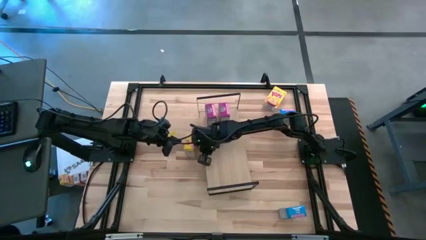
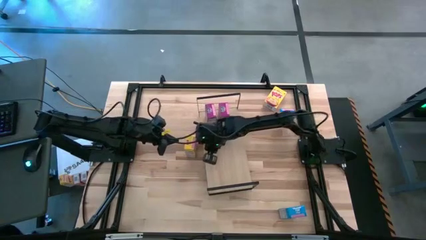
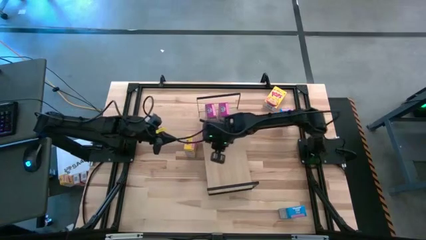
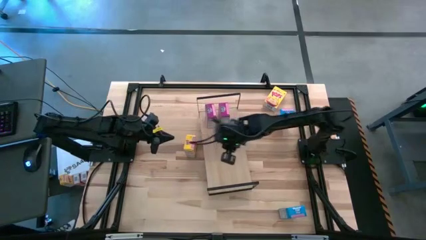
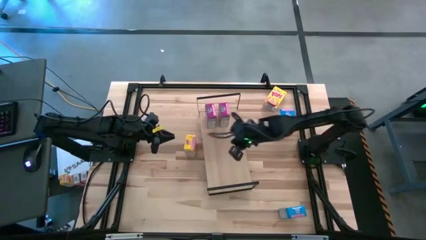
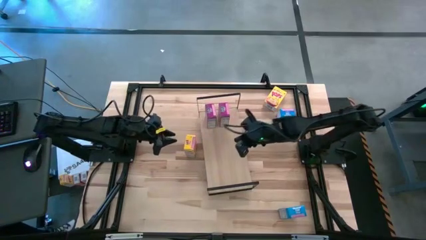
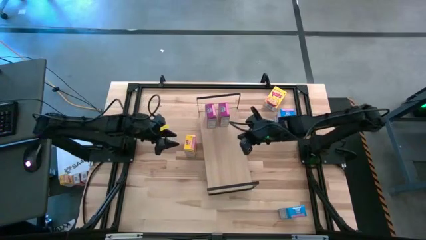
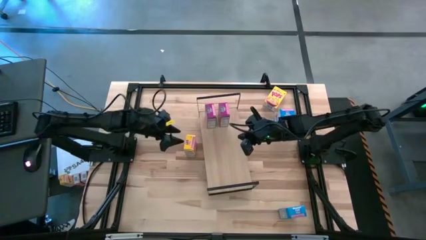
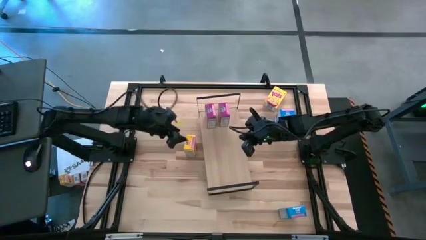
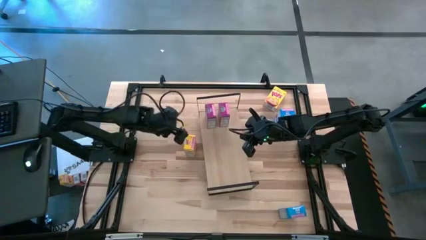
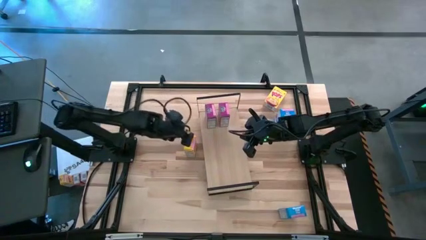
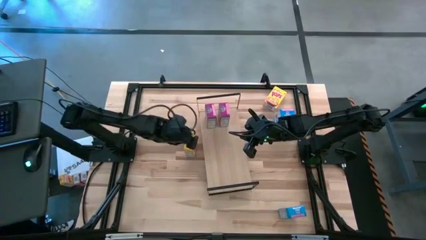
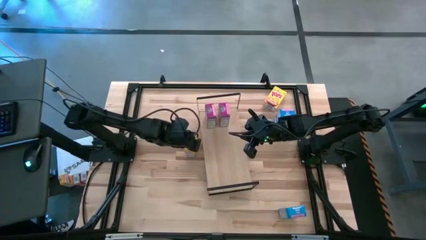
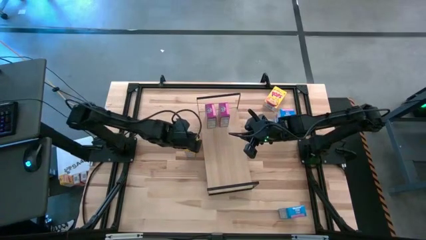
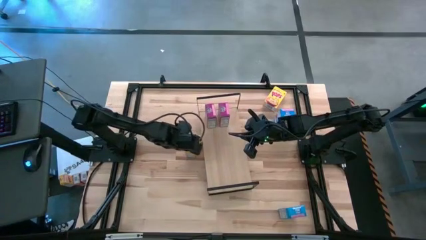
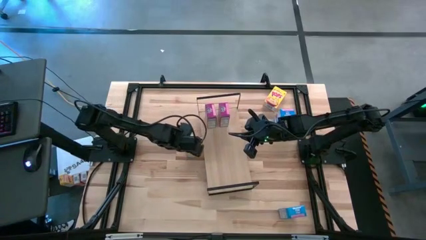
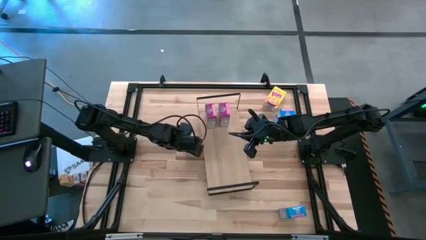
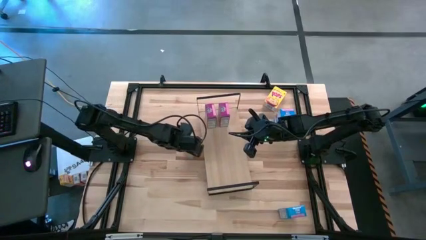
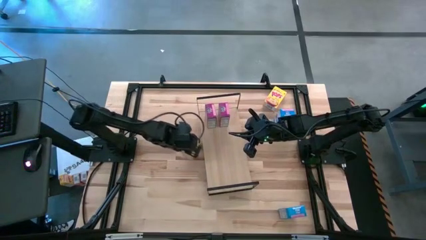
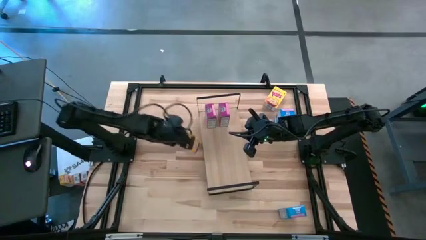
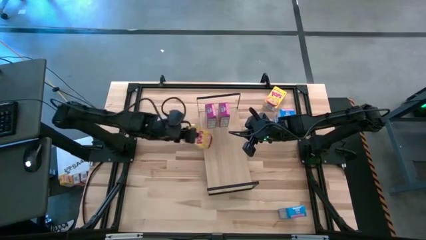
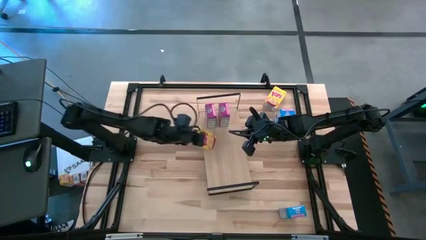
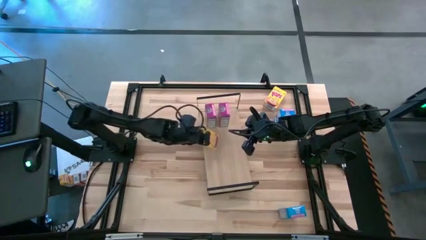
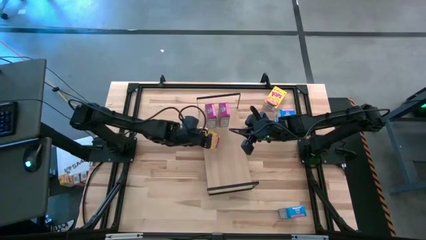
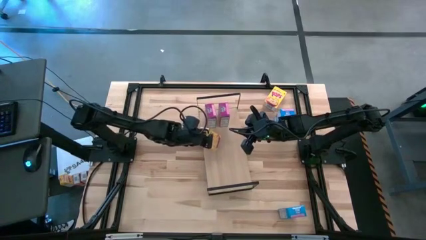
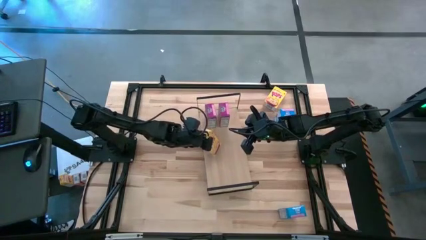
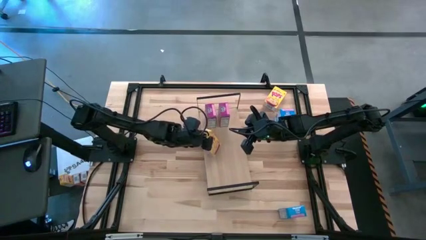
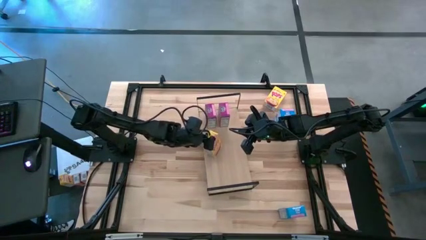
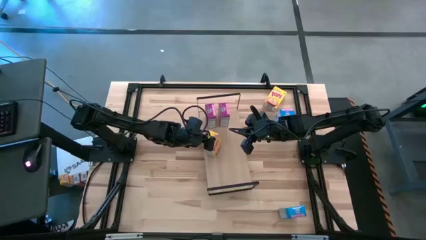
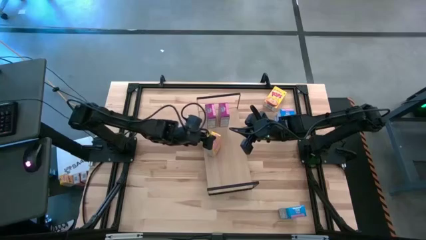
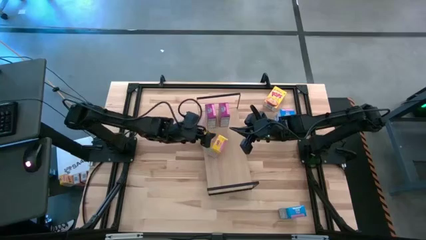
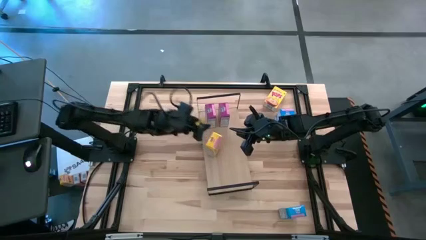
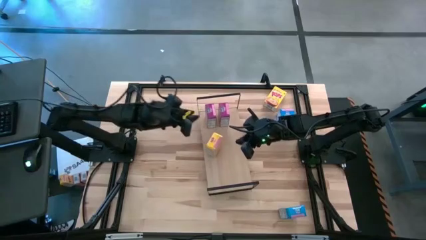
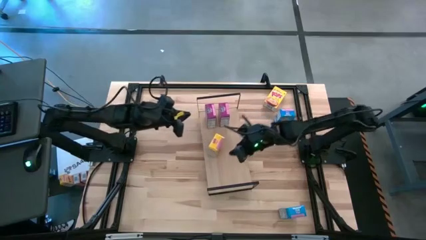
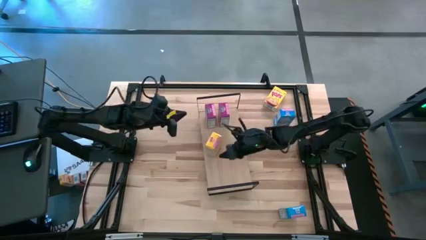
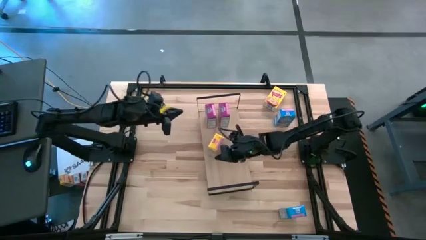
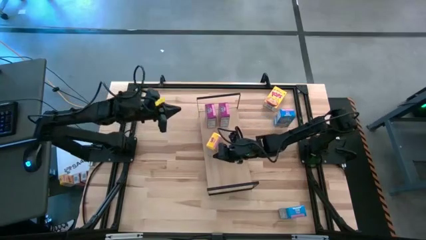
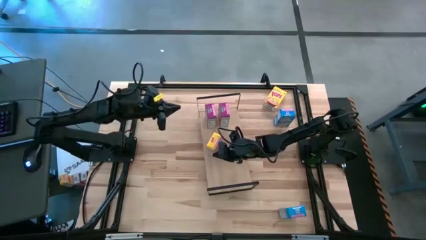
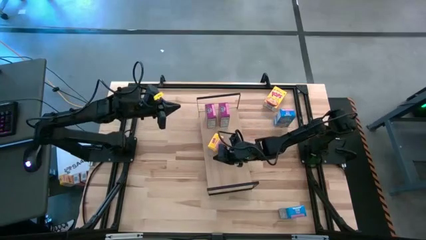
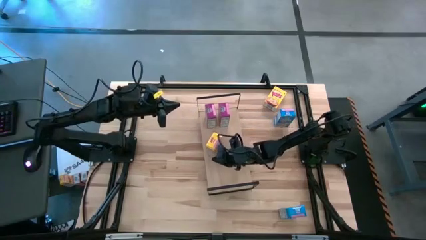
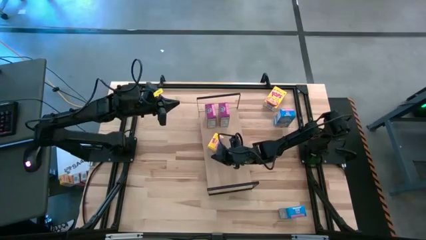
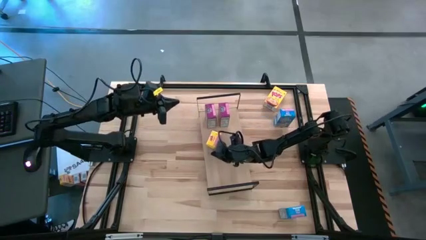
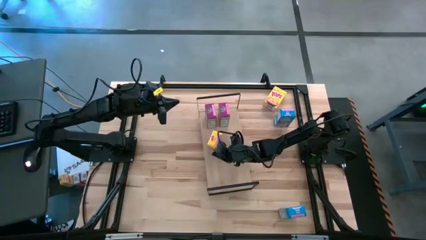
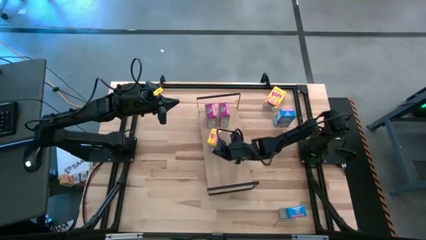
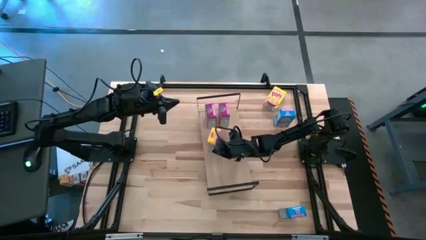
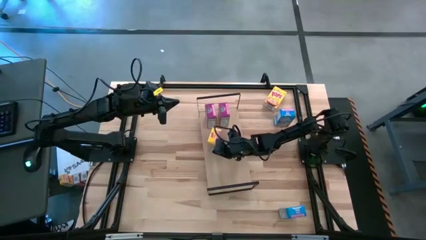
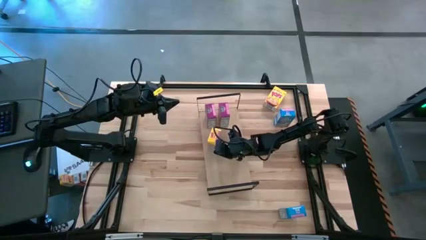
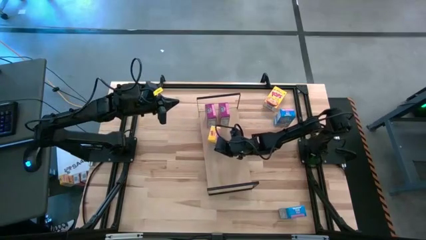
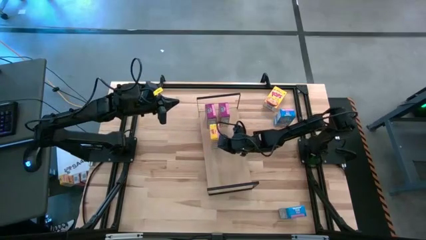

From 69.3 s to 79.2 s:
Task: Stack cereal on shelf
Put the left yellow cereal box on the shelf

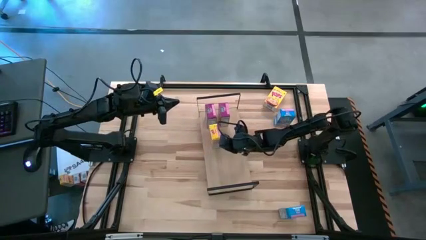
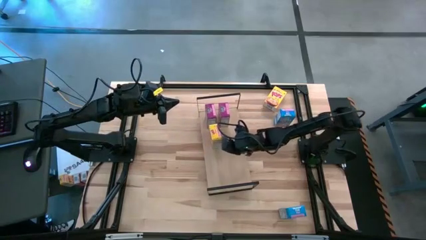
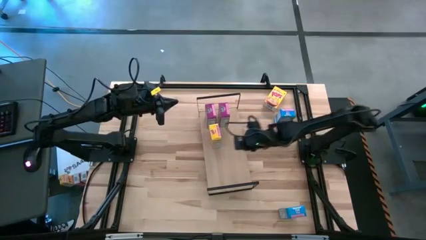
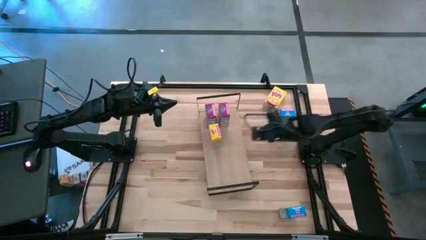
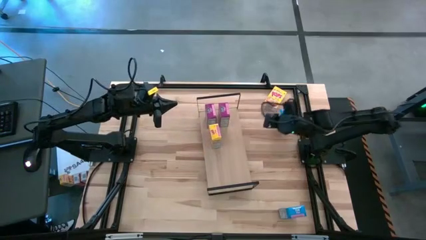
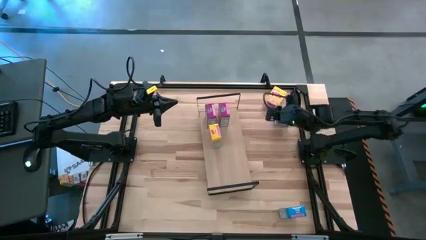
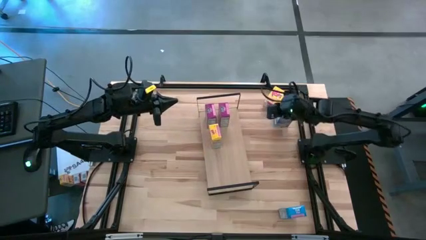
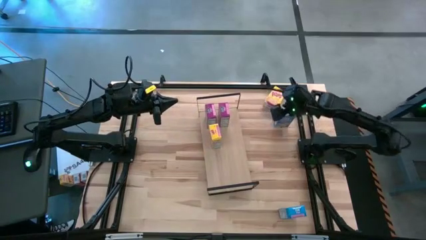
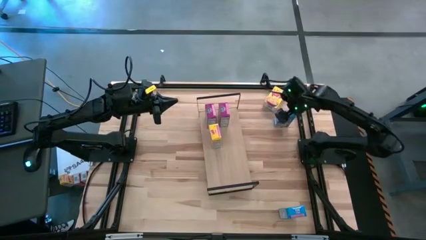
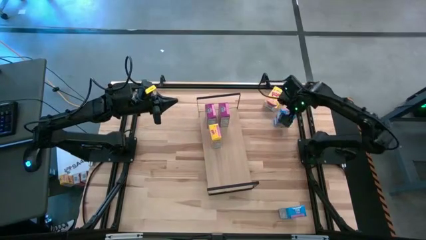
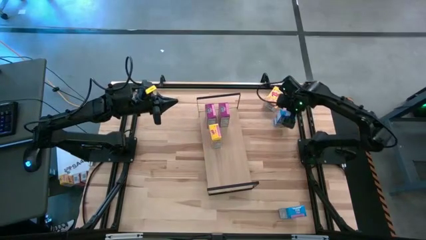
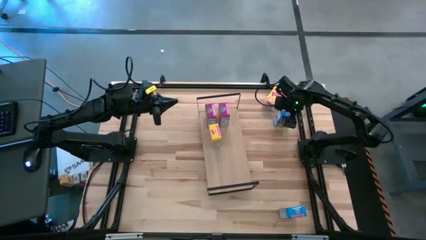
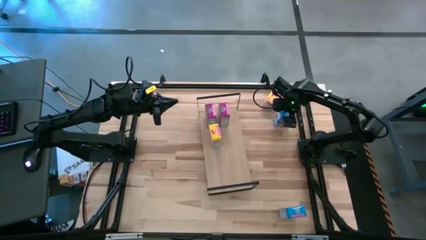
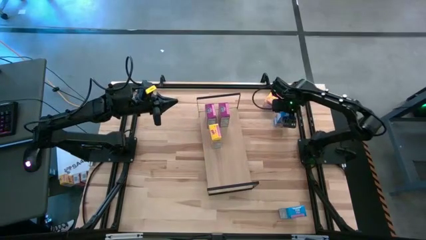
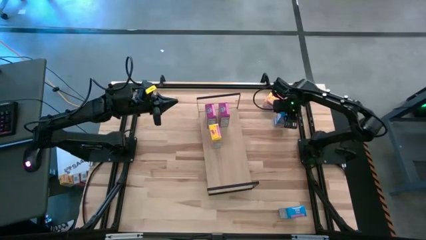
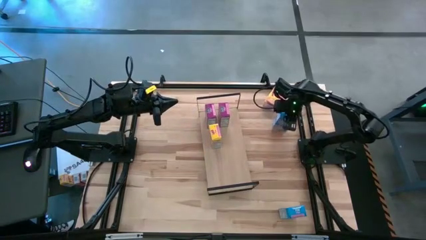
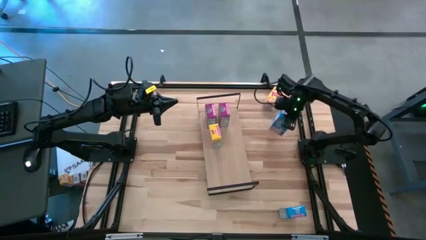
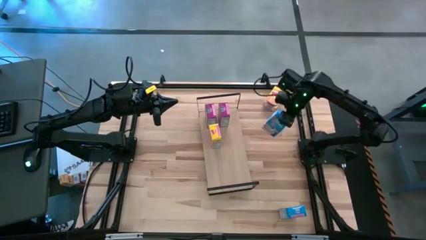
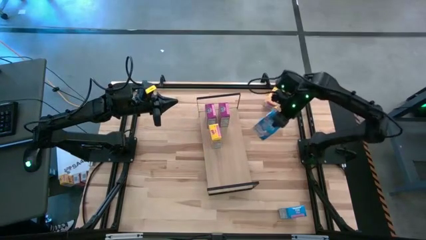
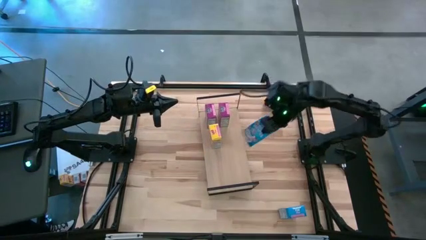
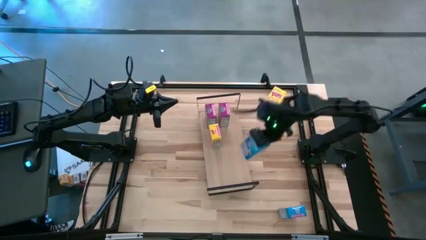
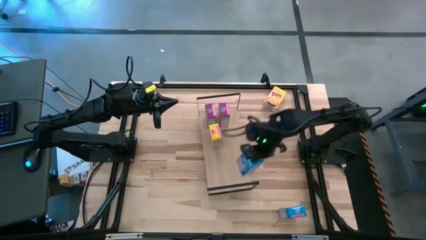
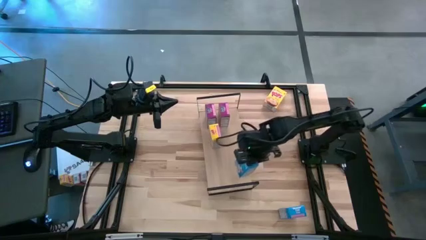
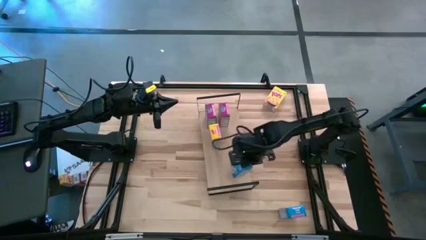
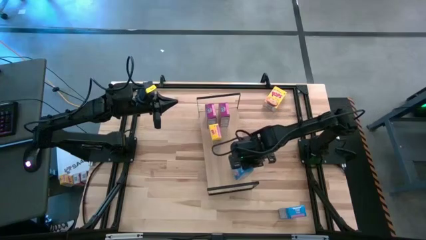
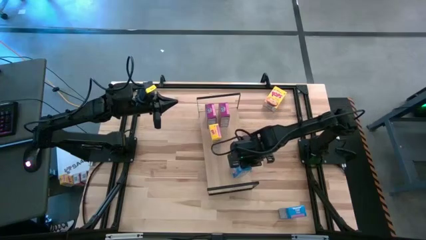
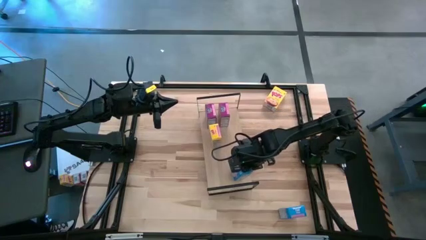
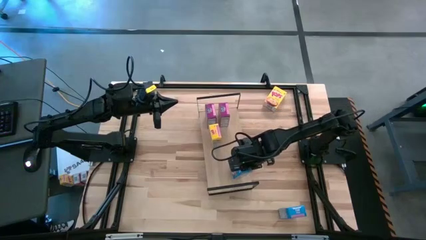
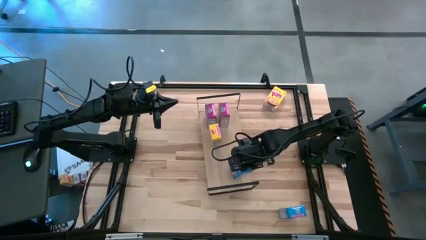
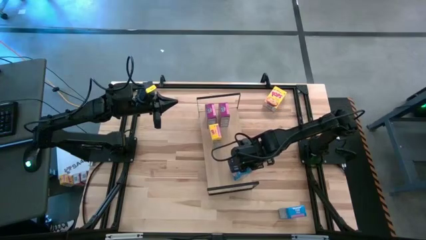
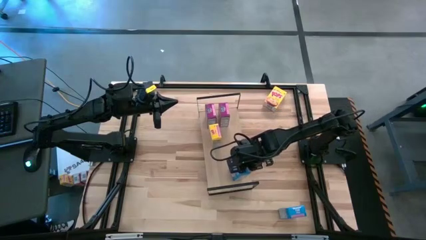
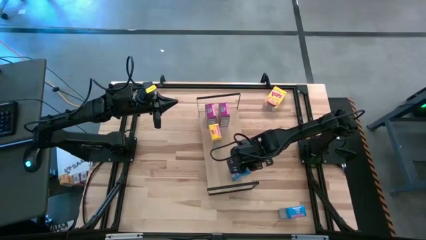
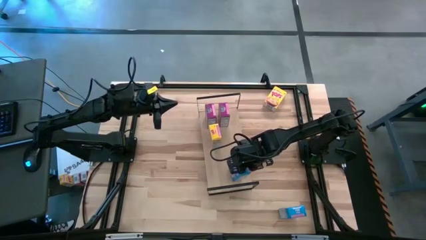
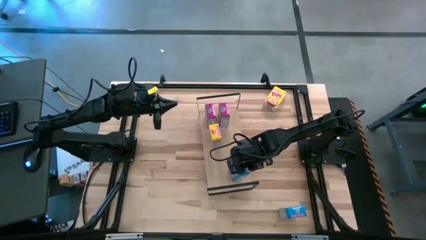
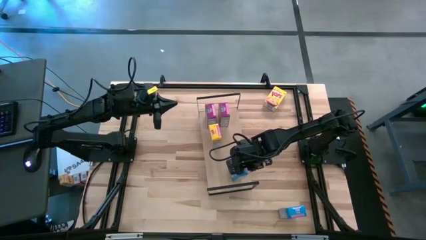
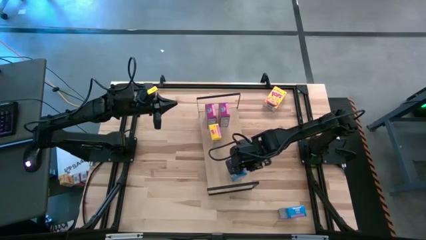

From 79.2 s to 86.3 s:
Put the top blue cereal box on the shelf
